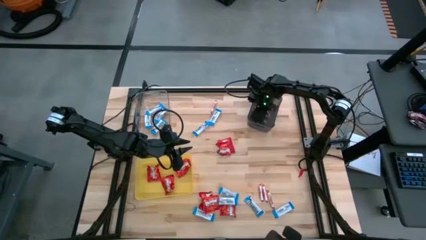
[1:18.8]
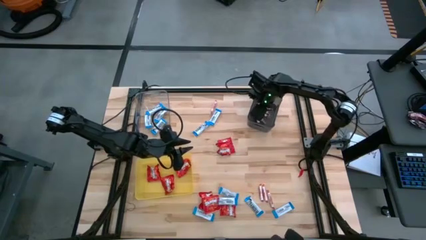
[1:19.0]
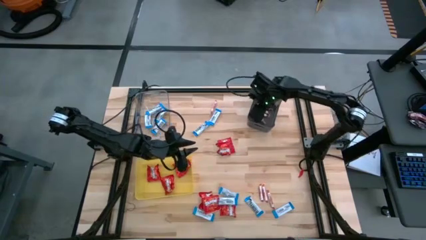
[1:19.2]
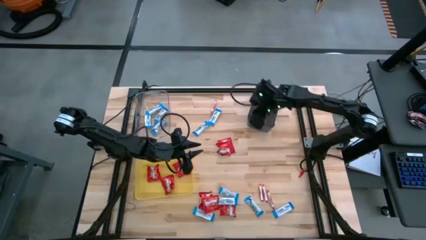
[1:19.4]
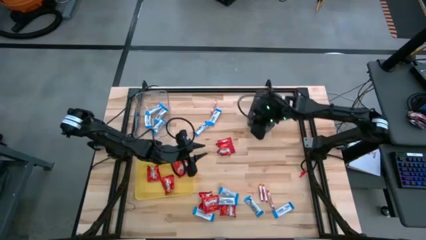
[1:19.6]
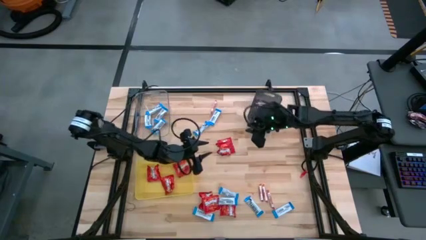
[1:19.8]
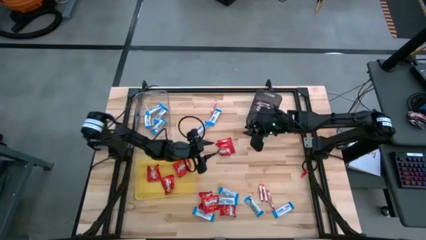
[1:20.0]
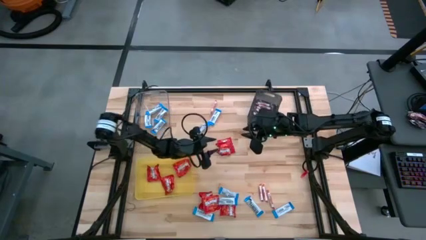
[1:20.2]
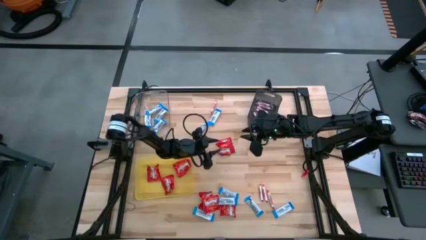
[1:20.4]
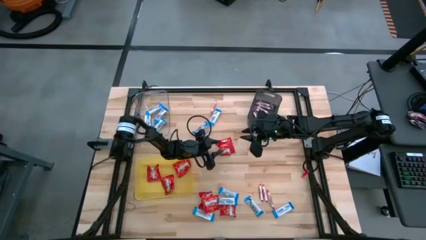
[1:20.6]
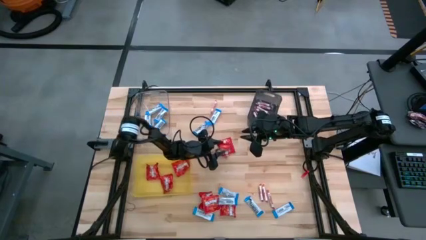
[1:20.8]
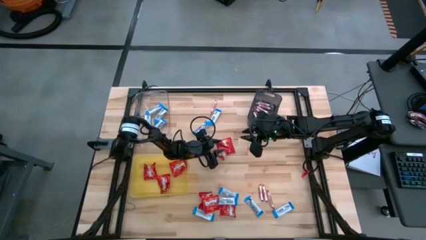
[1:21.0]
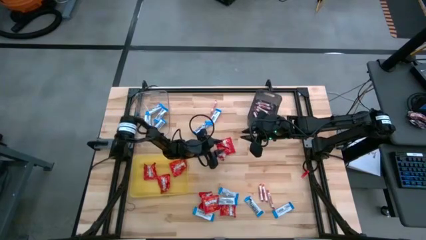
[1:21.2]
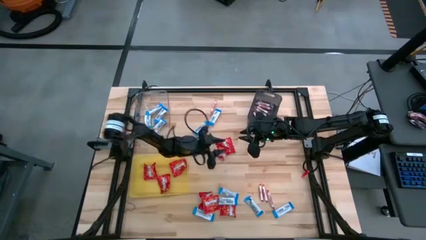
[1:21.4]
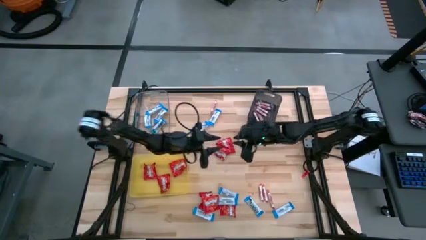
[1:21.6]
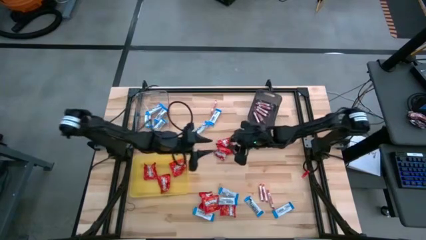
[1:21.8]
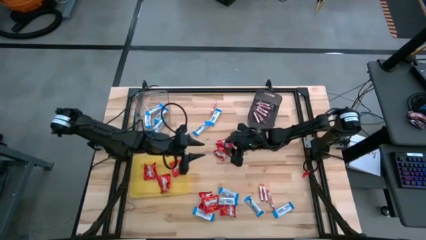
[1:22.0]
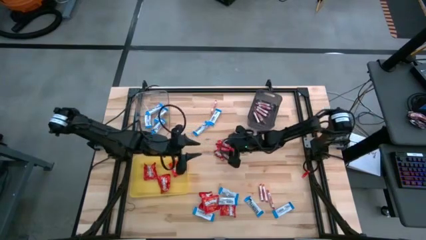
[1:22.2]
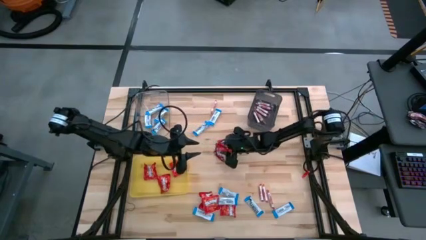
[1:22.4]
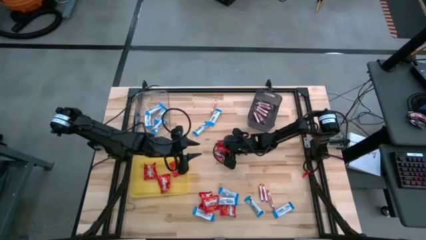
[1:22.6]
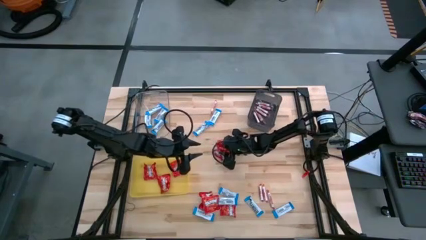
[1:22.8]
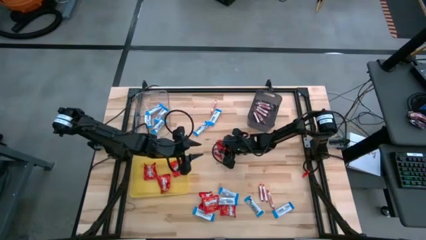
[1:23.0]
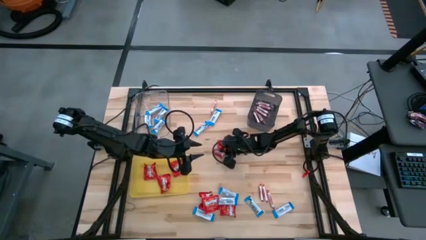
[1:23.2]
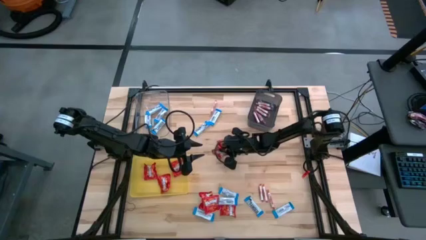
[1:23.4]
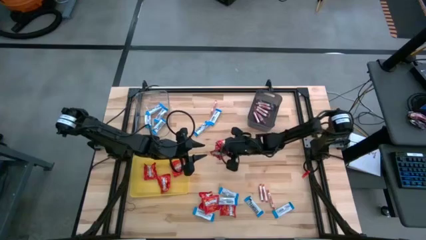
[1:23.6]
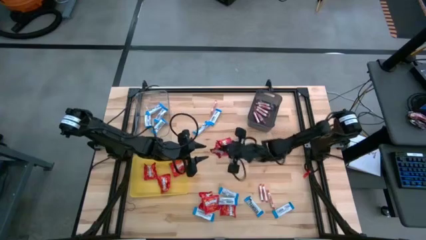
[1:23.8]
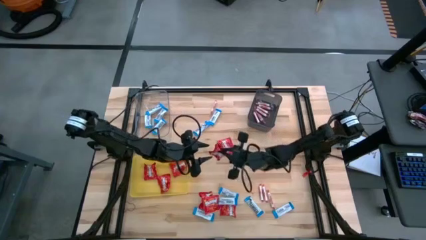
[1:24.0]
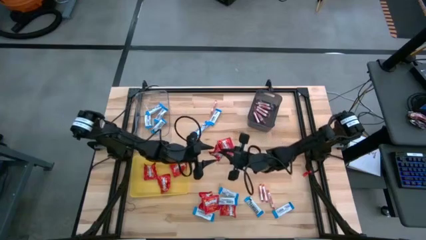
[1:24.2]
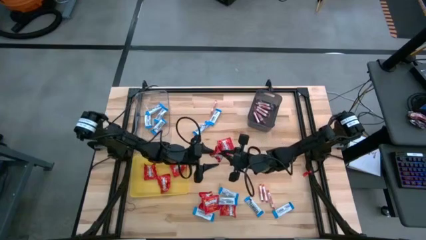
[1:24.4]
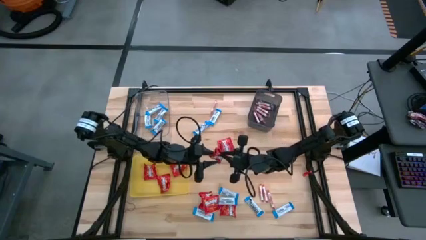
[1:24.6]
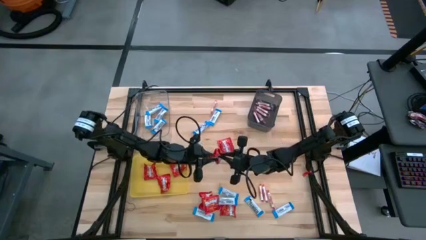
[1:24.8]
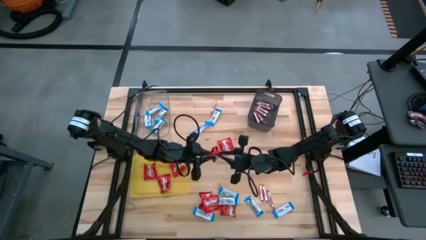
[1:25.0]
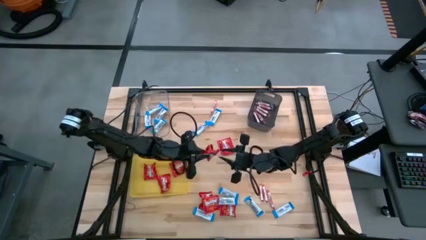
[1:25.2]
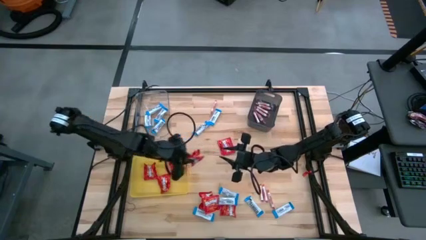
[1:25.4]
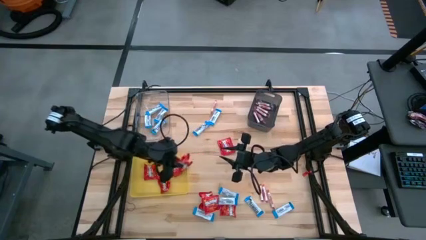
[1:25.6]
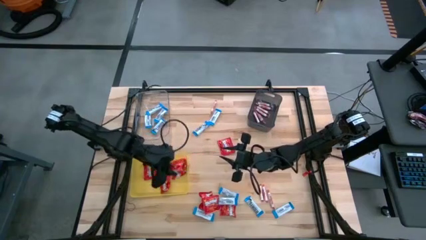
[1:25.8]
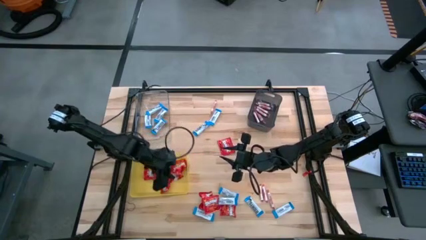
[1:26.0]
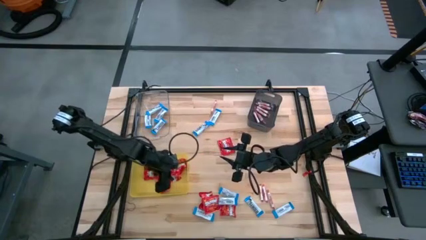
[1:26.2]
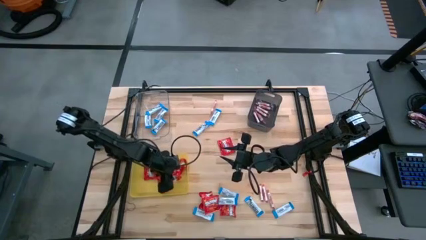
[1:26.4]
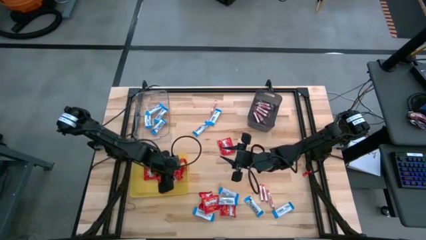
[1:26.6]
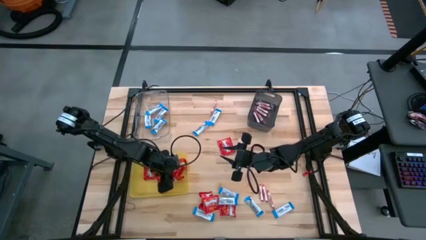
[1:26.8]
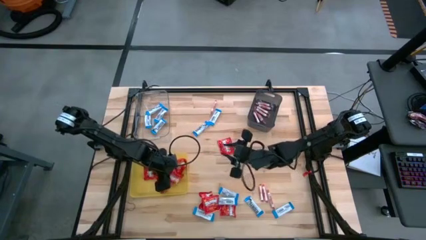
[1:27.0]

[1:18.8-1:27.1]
Task: Sort candy
Put the red chocolate into the yellow bin

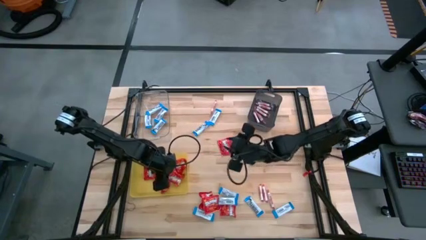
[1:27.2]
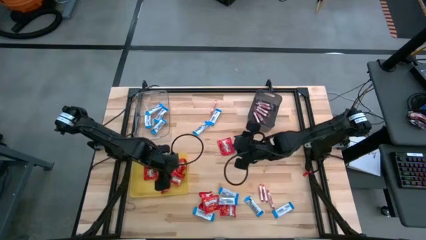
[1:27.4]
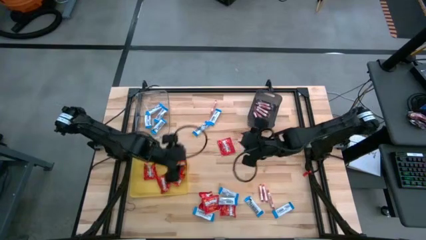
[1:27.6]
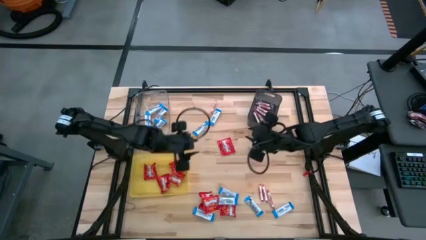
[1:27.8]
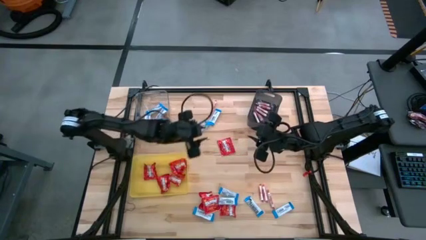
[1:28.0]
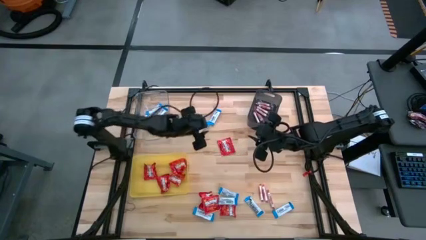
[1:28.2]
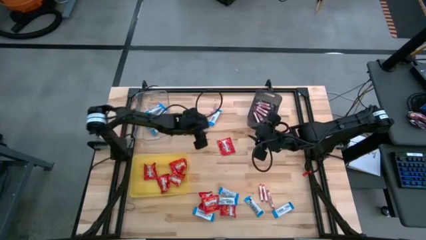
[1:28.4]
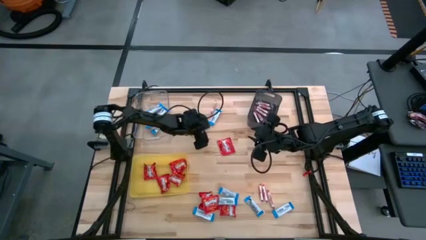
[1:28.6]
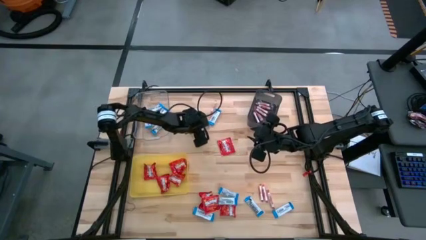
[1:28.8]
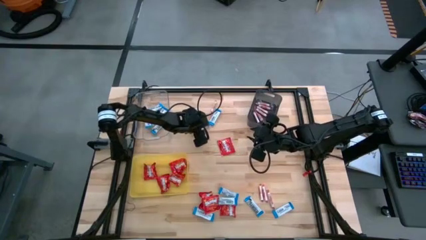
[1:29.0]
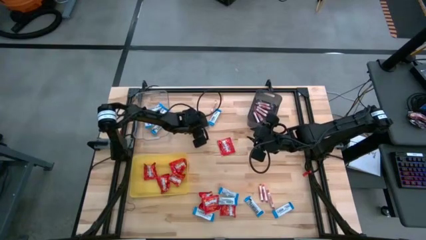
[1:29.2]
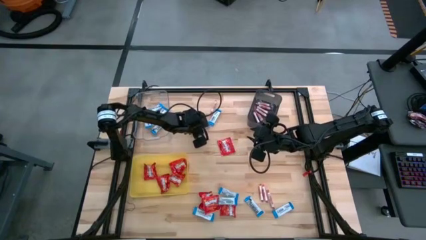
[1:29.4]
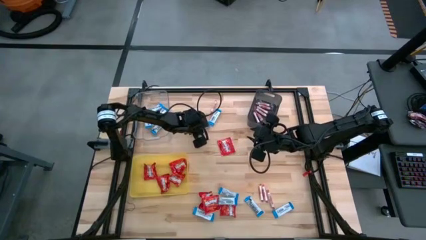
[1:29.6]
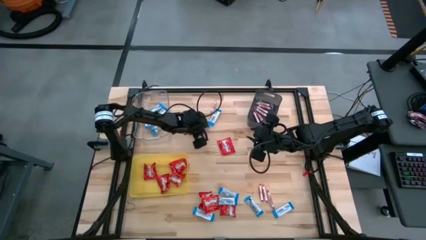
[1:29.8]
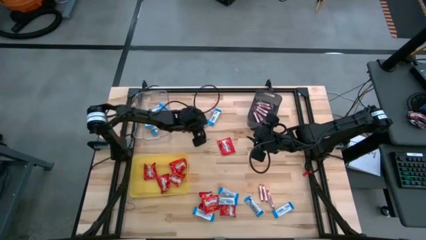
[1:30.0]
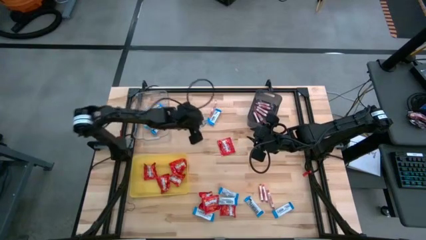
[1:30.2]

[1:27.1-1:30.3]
Put the blue chocolate into the transparent bin

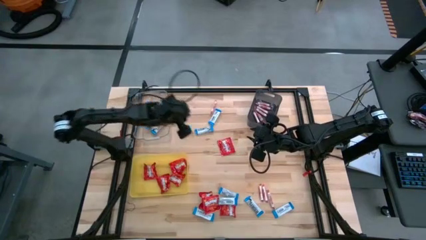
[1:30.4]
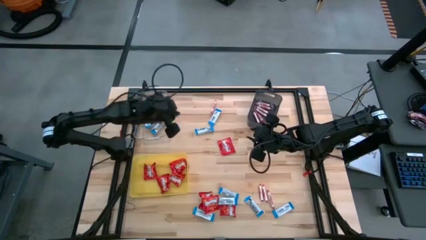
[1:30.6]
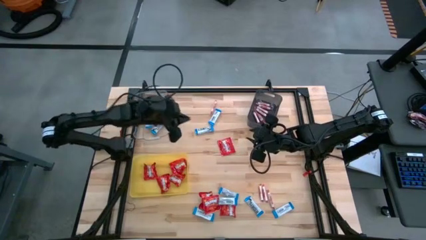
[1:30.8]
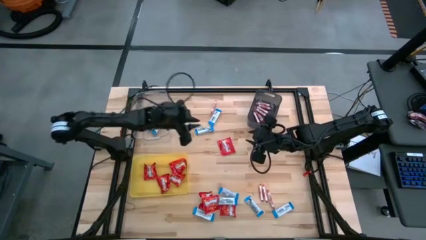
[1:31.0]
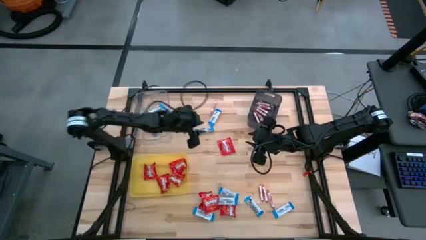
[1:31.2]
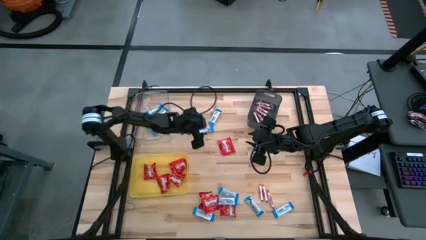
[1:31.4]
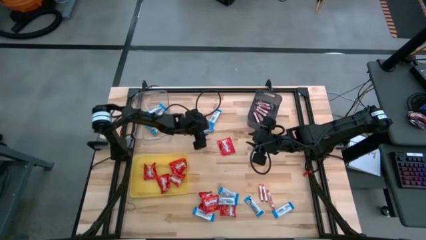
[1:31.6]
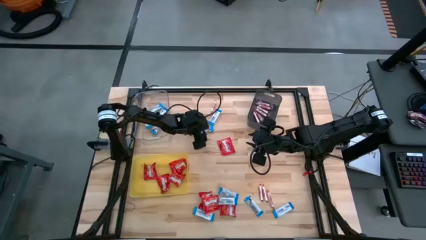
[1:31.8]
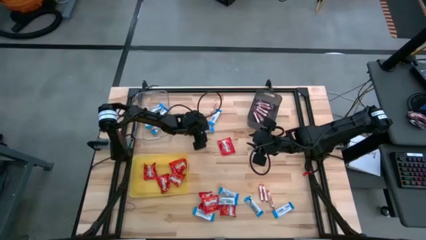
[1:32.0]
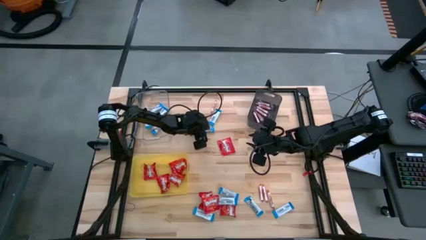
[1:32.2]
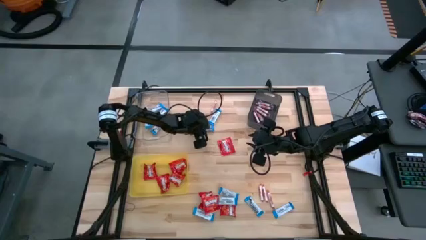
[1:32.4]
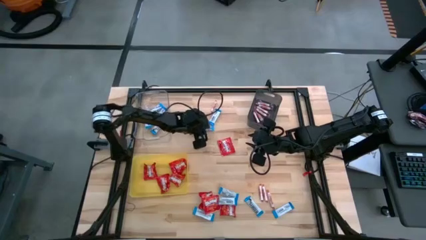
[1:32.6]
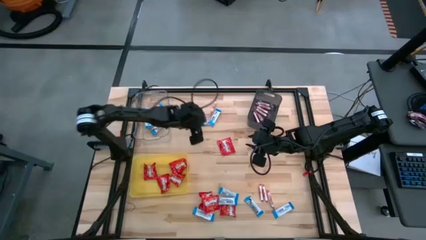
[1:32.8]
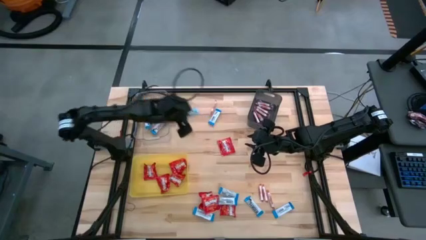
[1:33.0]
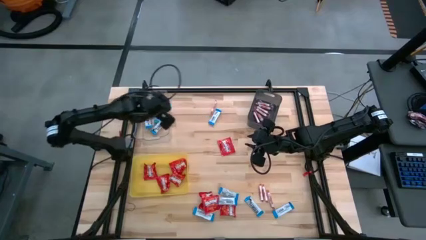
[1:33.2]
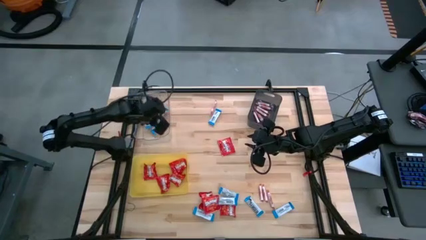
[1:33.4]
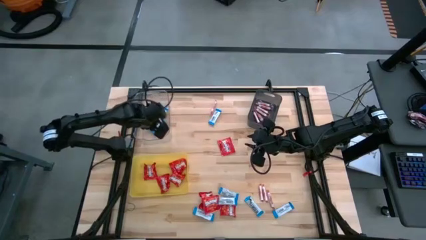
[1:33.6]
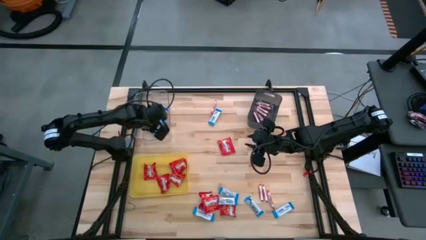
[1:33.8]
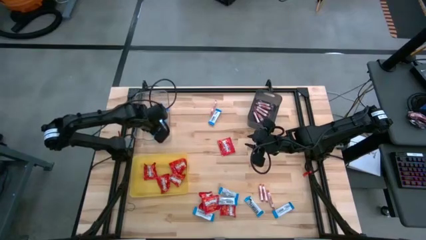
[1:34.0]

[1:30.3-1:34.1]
Put the blue chocolate into the transparent bin

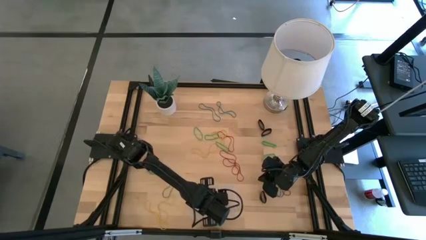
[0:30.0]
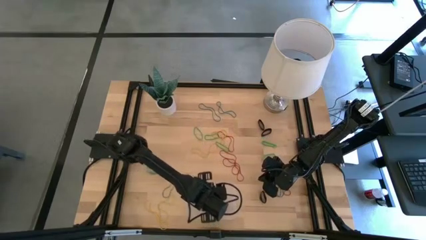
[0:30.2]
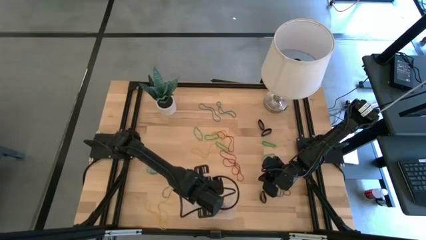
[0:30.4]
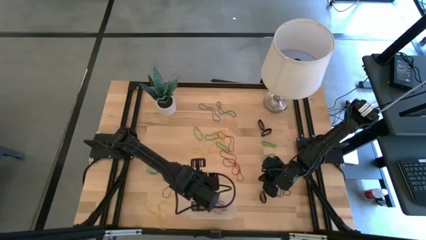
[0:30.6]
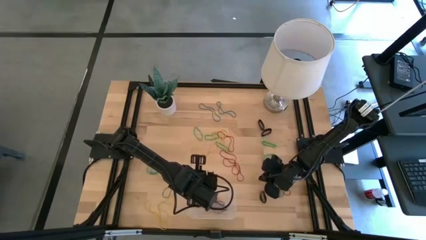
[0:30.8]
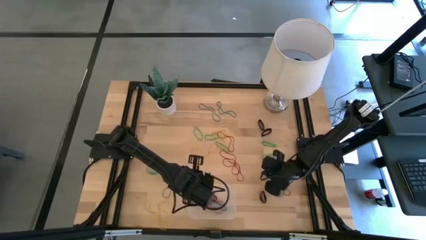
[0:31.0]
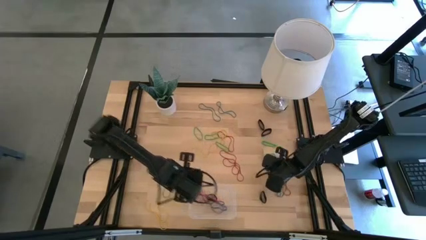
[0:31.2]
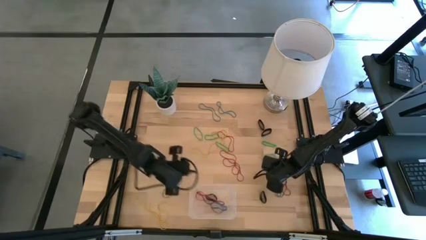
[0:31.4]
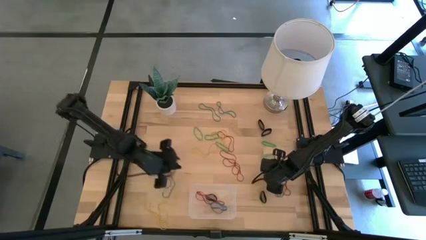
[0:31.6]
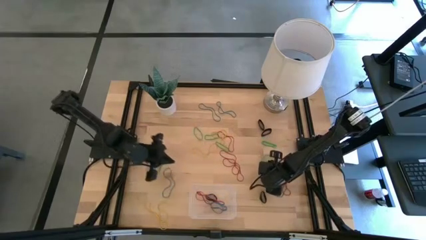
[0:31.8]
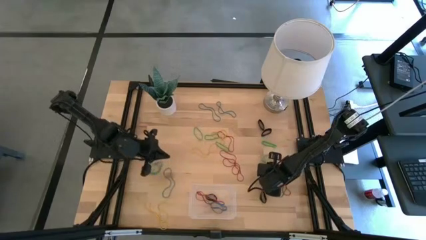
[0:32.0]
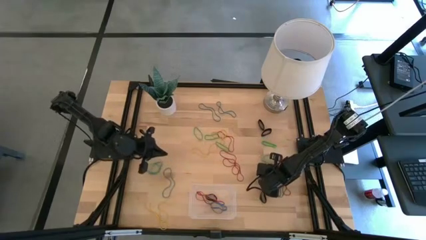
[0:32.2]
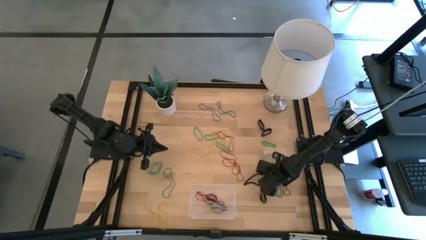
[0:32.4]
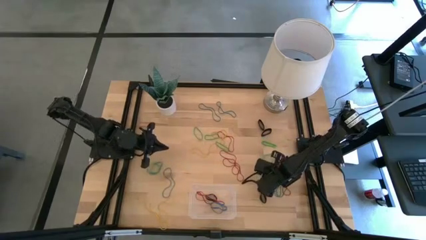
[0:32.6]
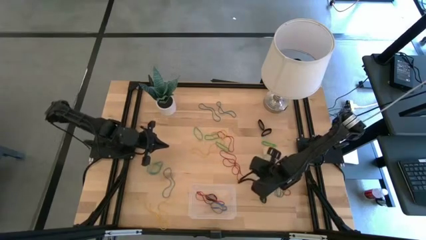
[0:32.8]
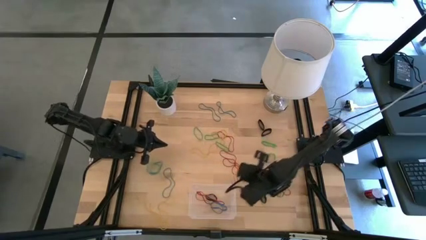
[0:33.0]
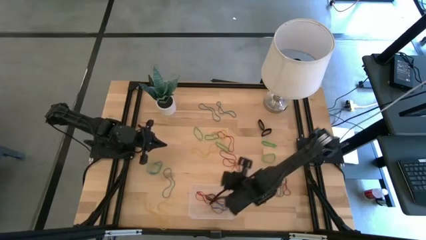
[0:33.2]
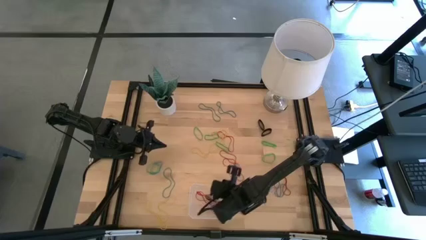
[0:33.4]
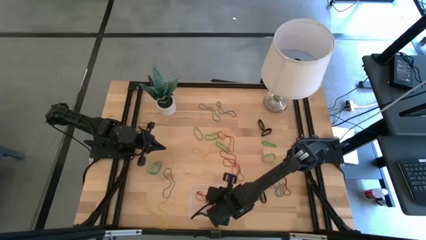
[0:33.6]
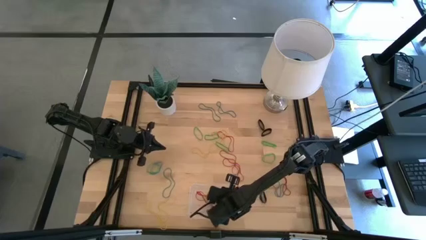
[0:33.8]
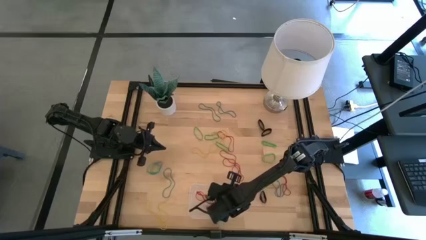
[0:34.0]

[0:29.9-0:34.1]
Task: Pick and place rubber bands into bin
Put the yellow rubber band into the transparent bin
